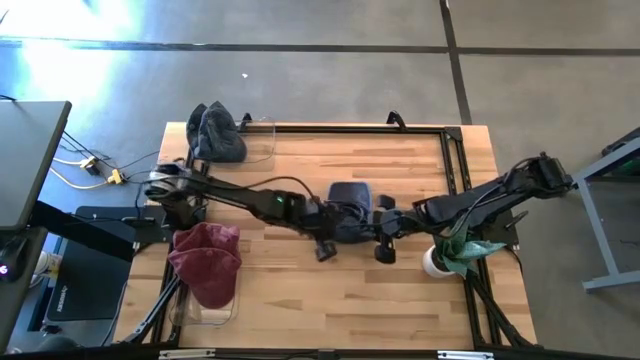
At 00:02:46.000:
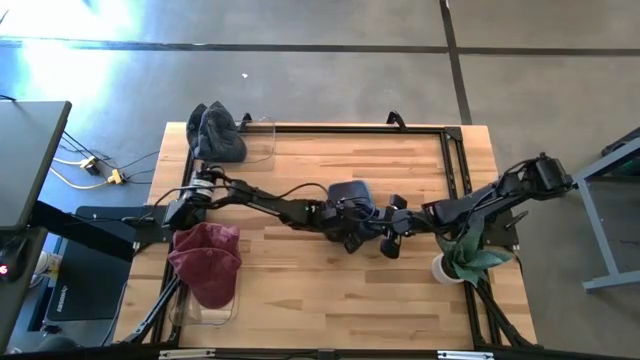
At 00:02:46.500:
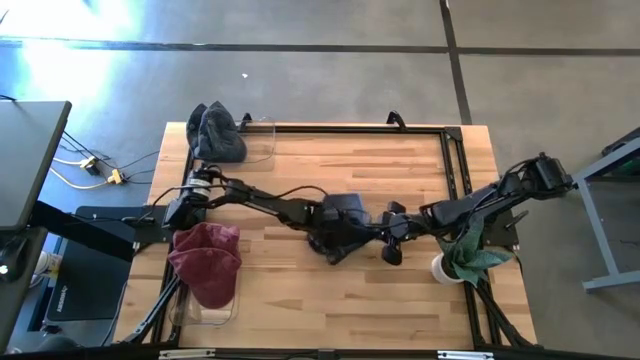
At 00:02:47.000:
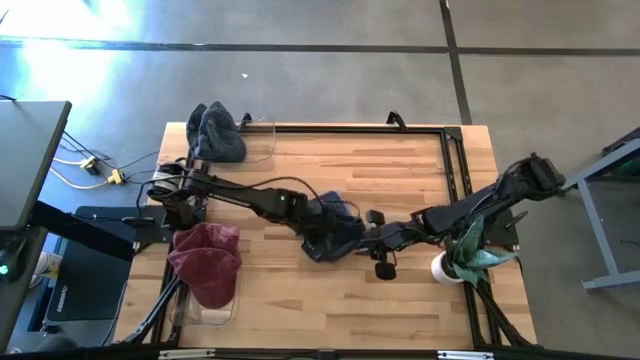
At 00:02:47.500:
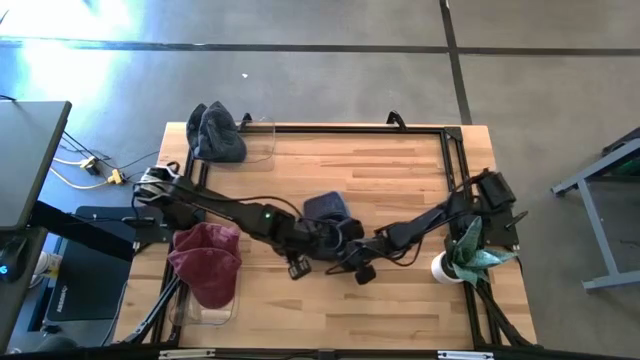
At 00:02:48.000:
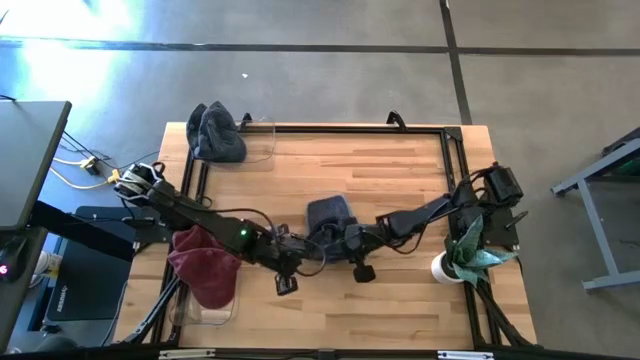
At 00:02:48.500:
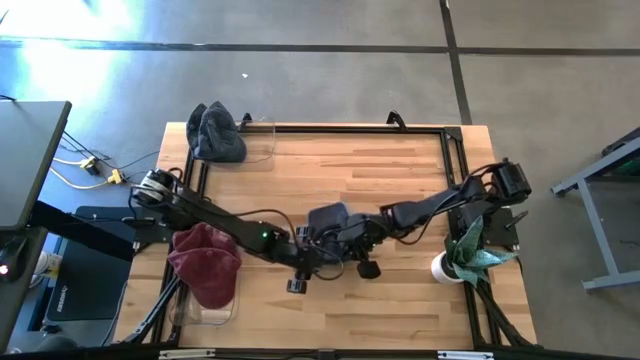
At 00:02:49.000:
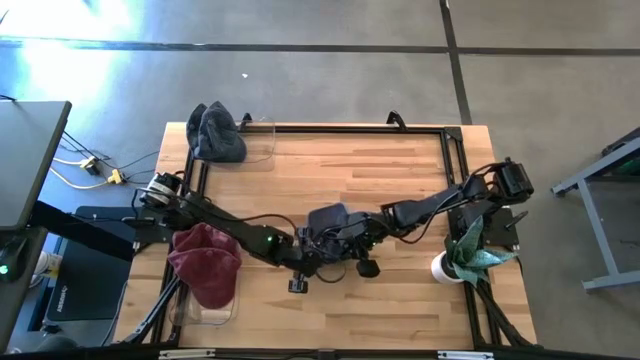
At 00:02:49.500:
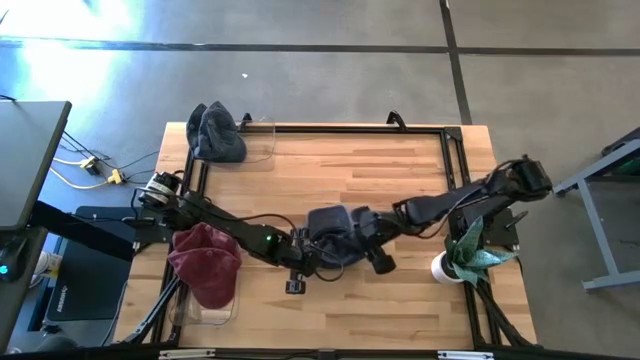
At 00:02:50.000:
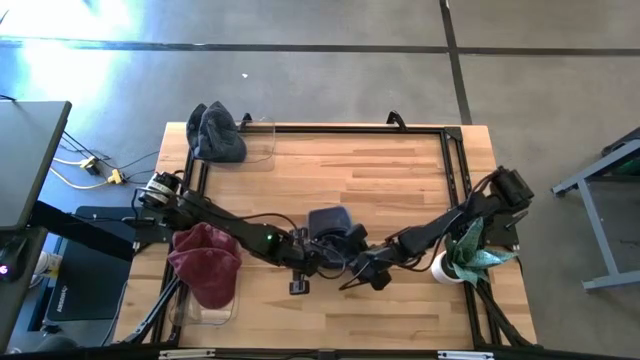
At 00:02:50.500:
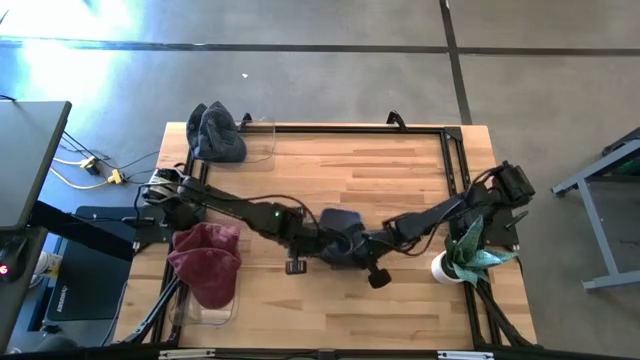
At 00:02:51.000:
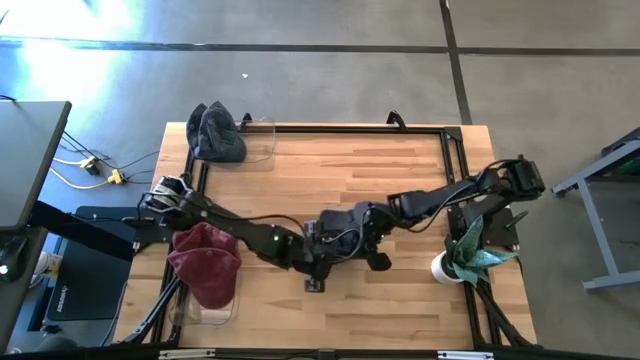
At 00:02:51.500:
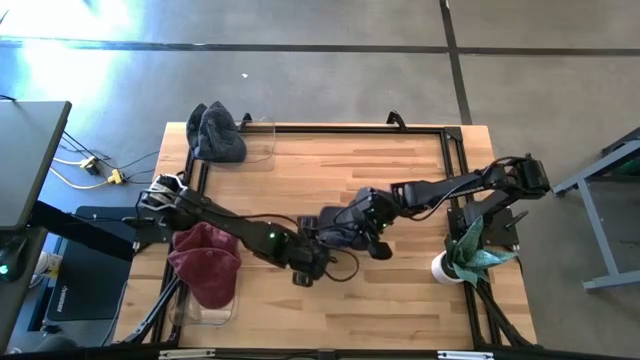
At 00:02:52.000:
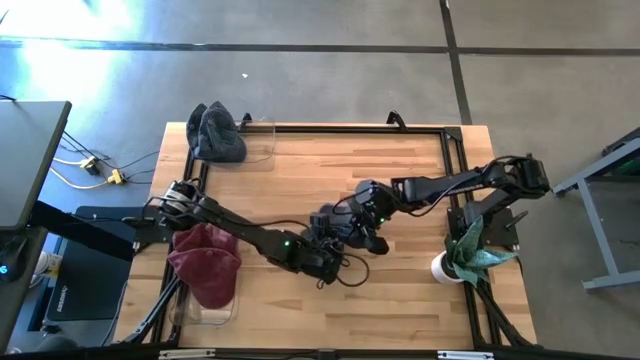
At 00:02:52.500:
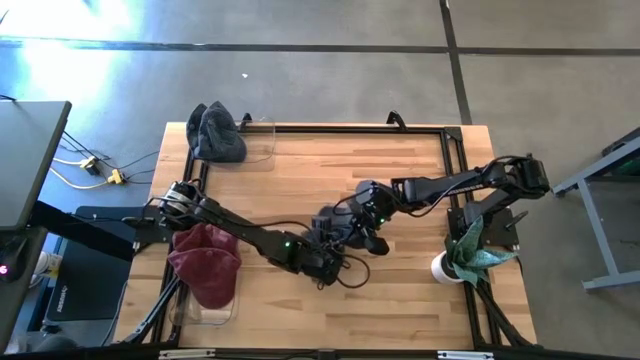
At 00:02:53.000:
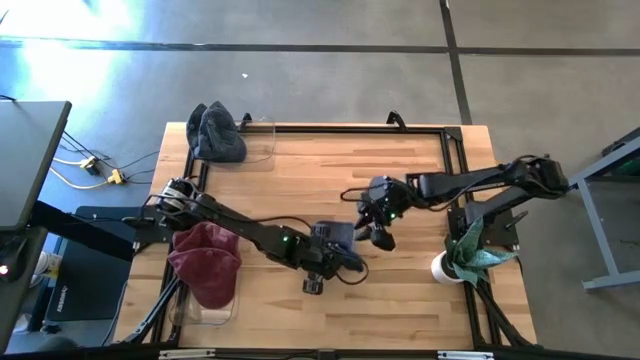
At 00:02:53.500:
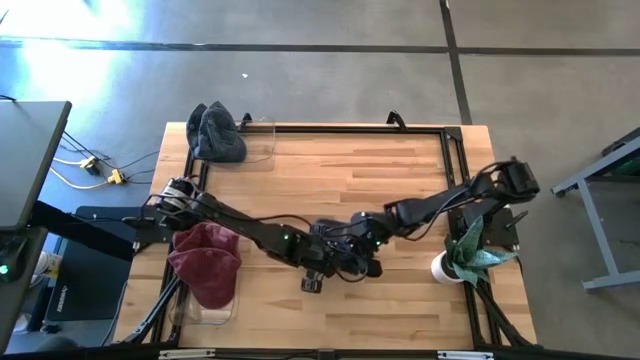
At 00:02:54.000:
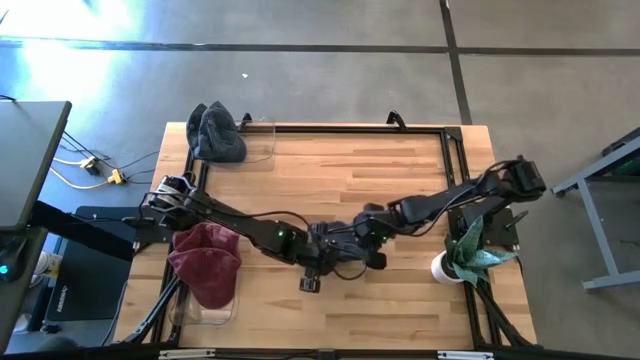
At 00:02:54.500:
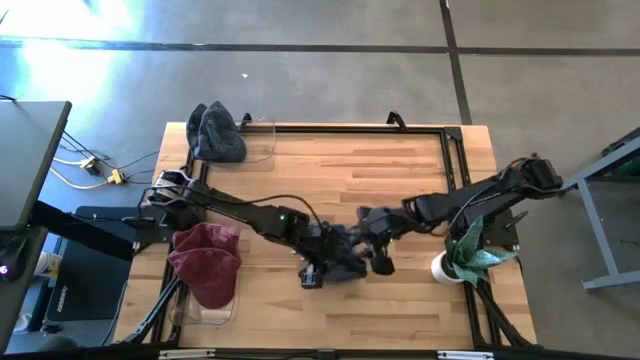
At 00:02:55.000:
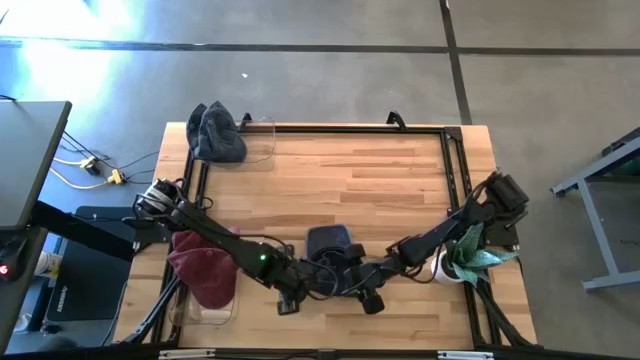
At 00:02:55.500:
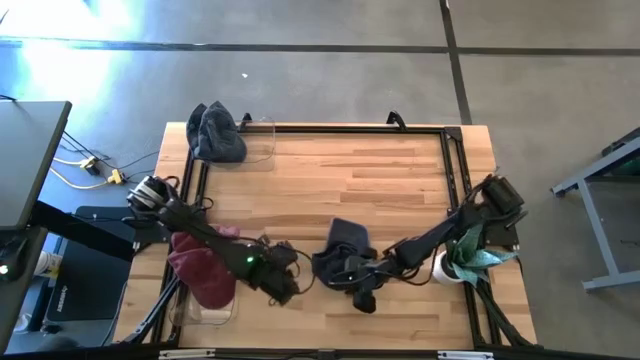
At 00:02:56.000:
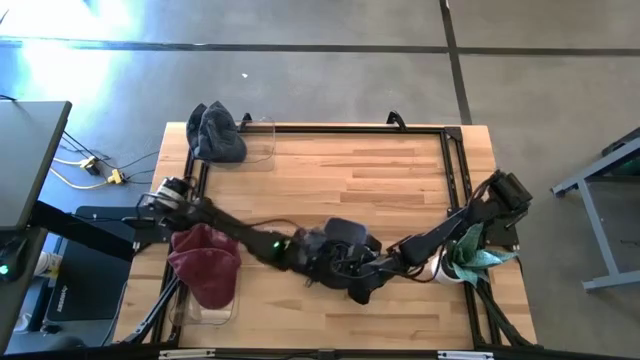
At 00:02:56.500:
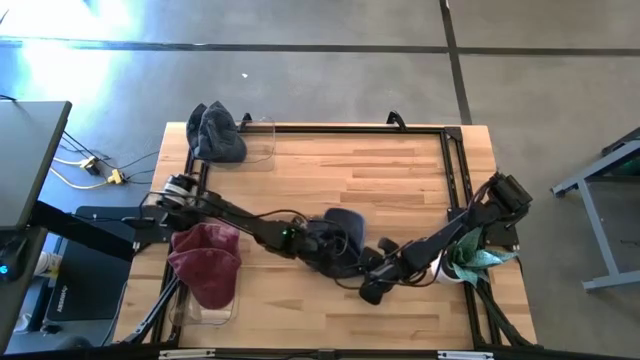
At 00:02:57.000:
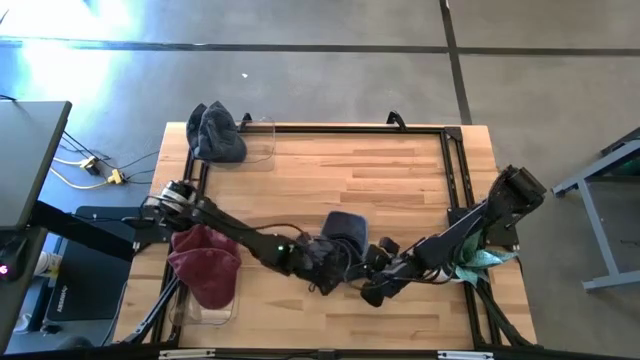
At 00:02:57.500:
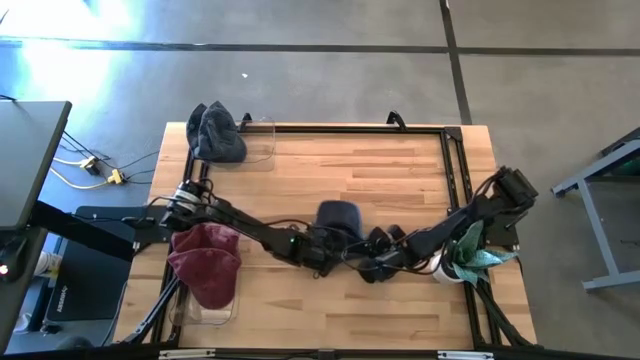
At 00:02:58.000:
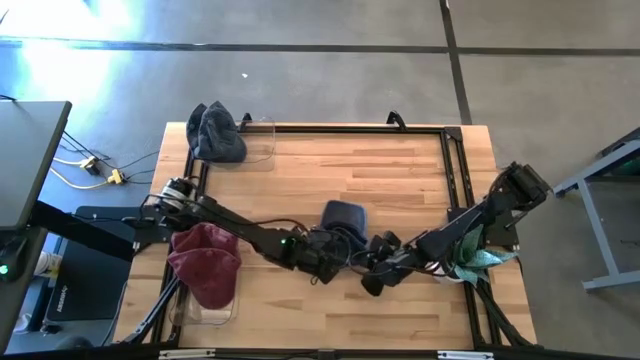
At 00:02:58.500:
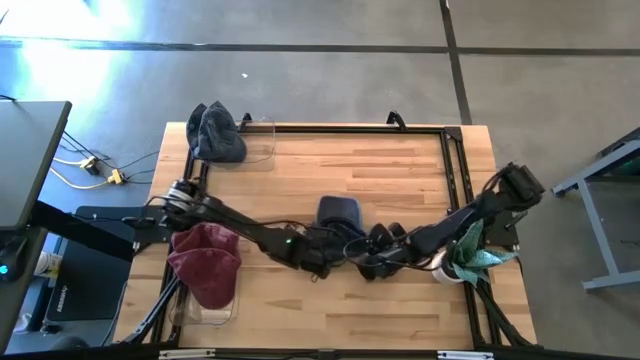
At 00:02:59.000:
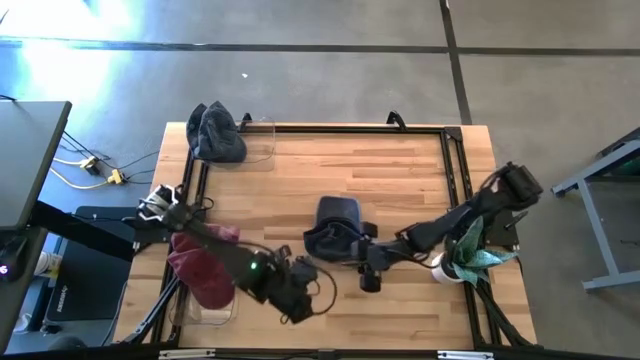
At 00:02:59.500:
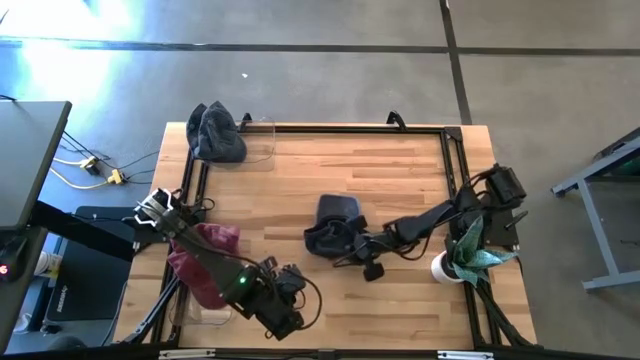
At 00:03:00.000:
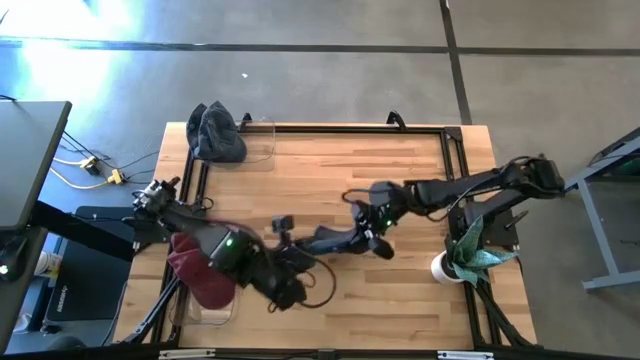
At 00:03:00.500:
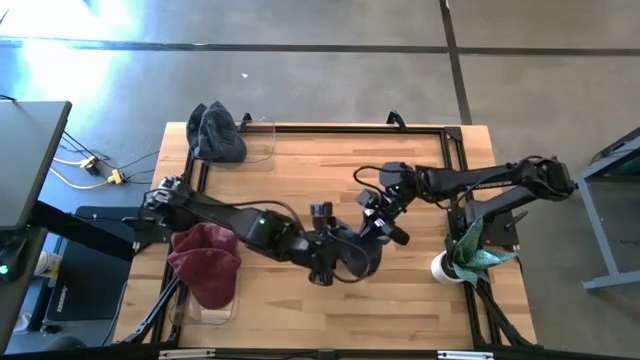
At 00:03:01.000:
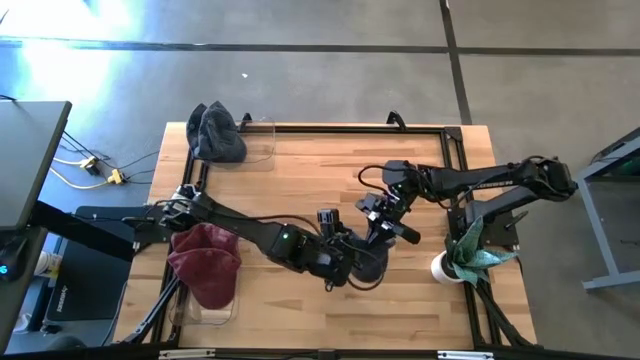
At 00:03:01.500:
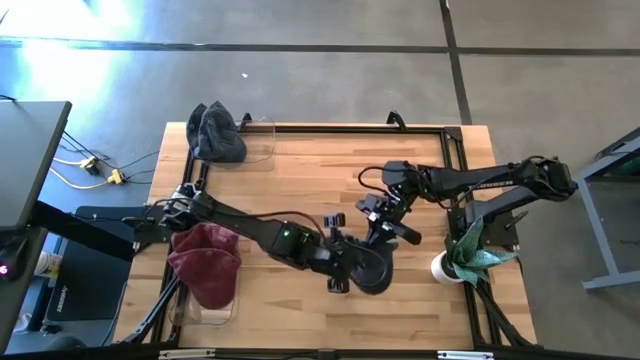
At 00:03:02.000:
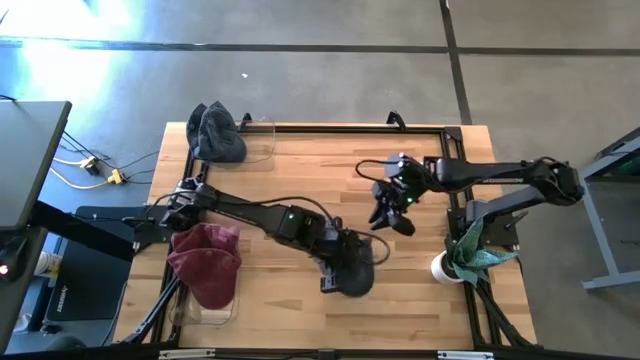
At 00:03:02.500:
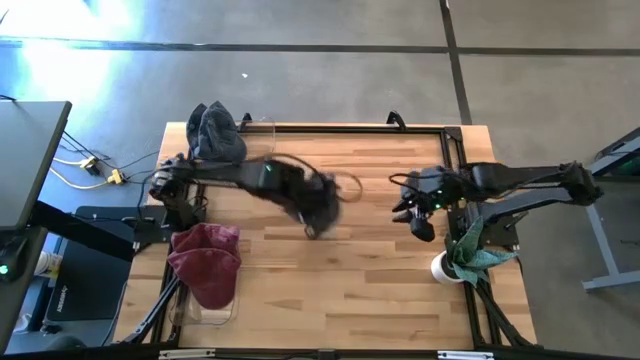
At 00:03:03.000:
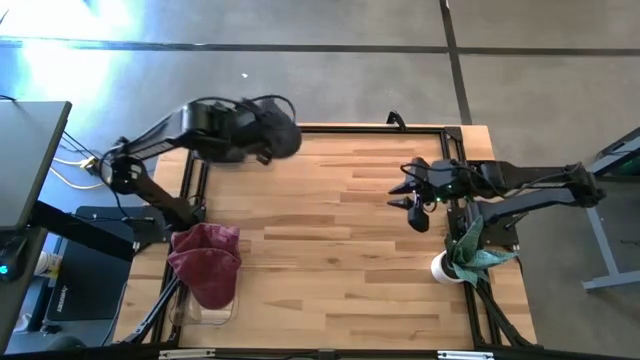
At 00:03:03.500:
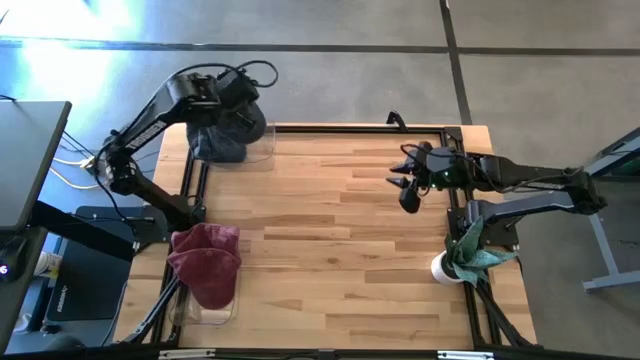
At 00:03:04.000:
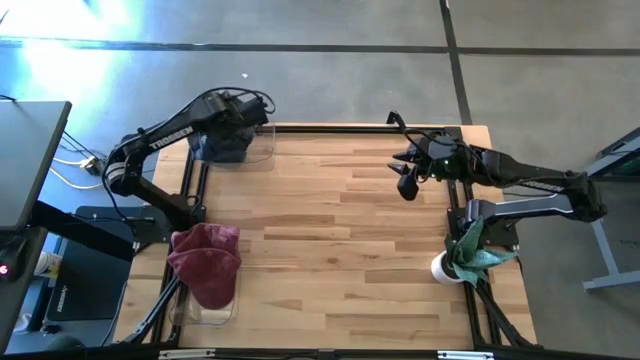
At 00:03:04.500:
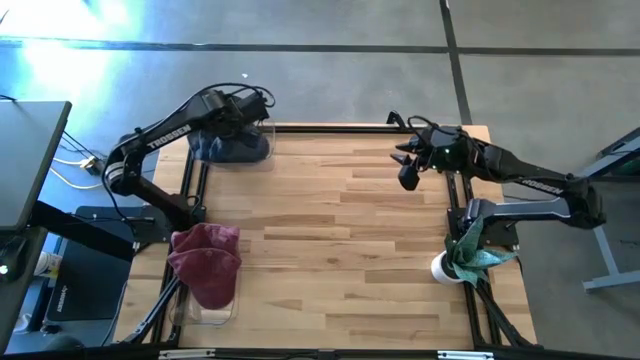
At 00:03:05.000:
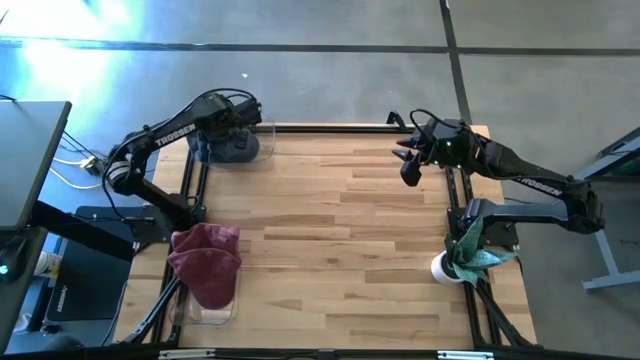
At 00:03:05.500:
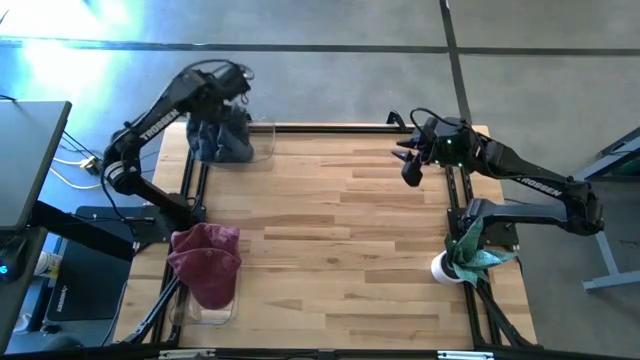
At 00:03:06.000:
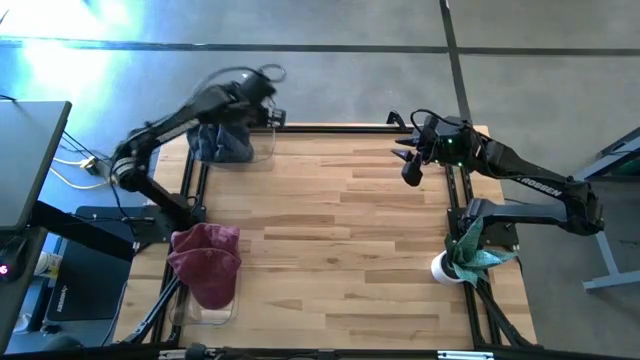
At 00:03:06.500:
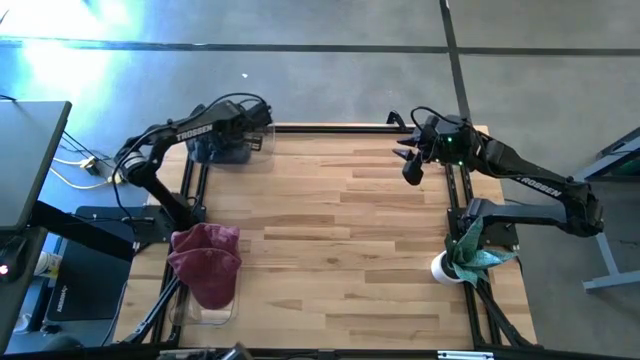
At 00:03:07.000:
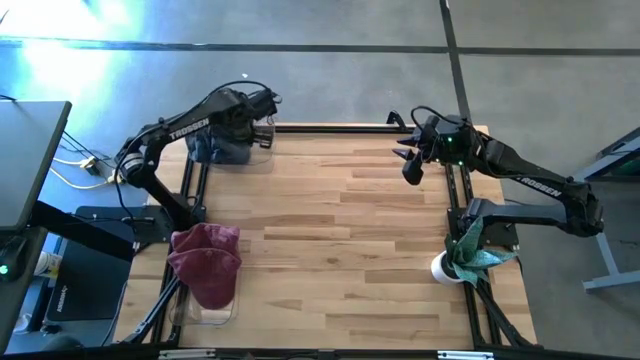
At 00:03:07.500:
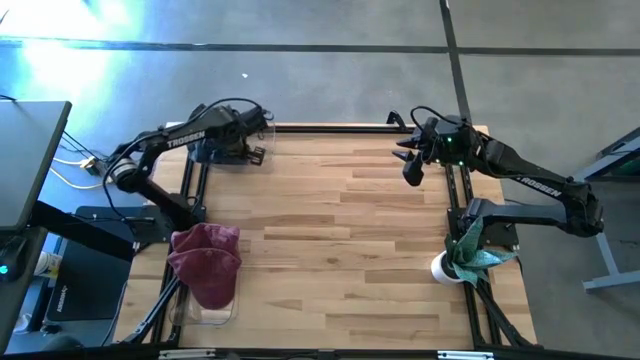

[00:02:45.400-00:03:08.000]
Task: Pick & Place hat
Put the blue cap into the top transparent bin
